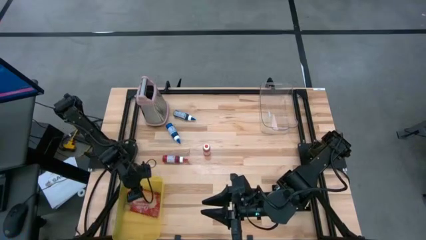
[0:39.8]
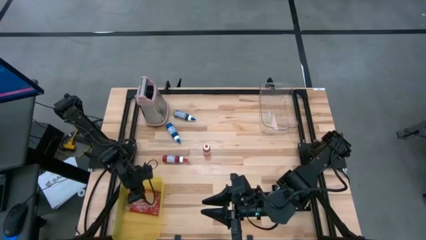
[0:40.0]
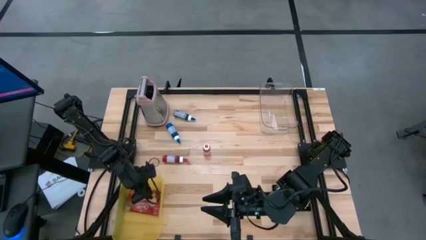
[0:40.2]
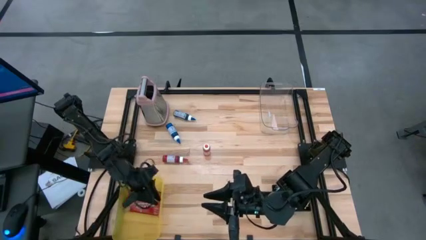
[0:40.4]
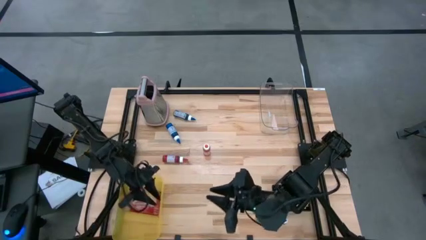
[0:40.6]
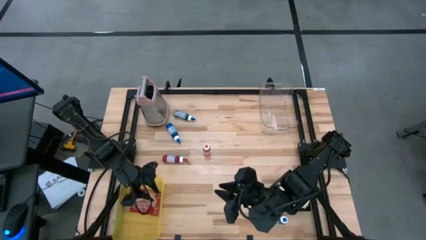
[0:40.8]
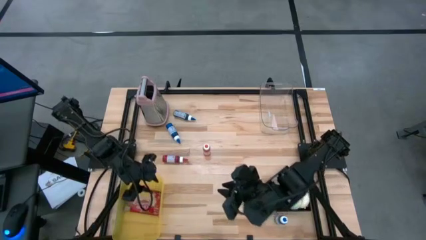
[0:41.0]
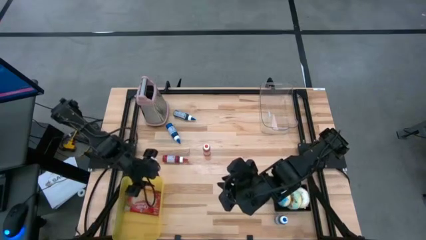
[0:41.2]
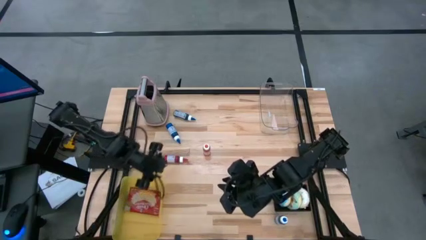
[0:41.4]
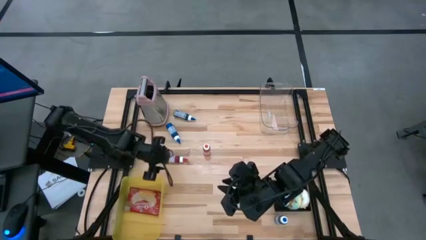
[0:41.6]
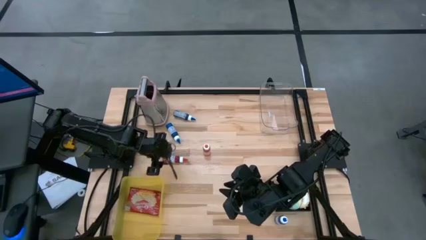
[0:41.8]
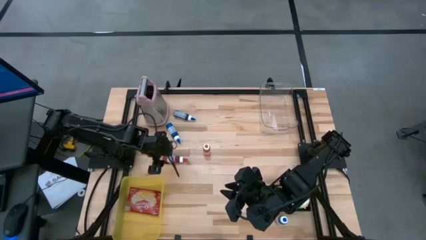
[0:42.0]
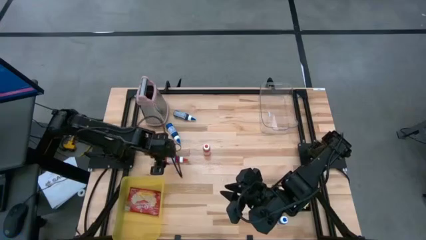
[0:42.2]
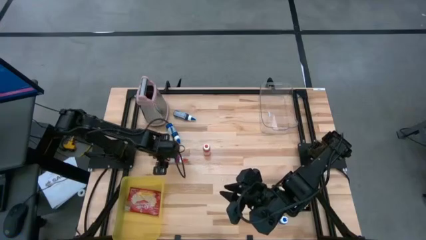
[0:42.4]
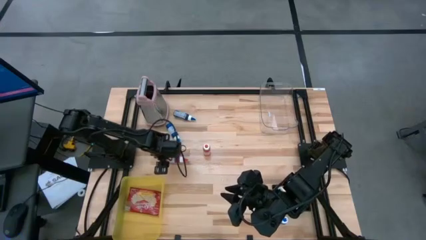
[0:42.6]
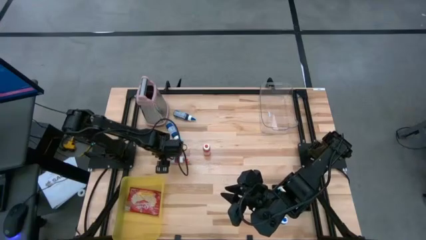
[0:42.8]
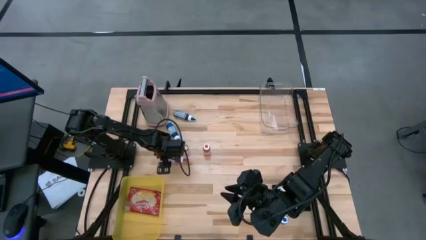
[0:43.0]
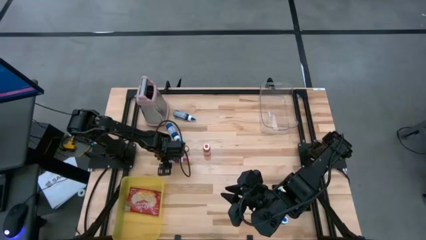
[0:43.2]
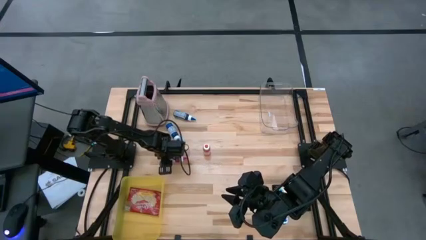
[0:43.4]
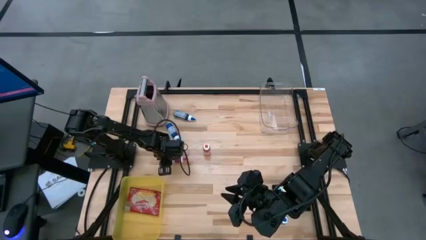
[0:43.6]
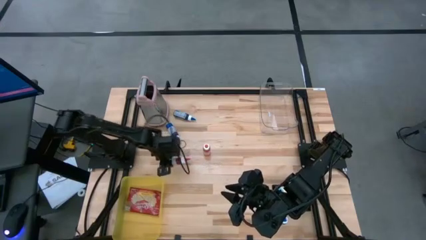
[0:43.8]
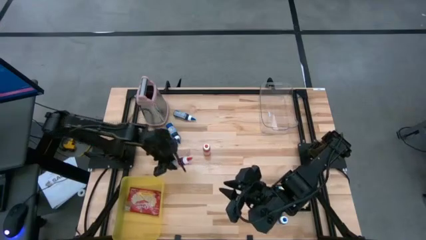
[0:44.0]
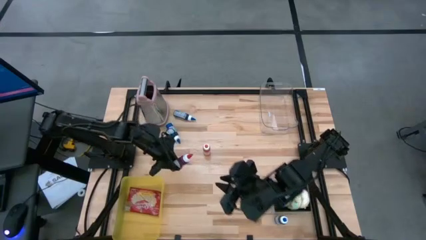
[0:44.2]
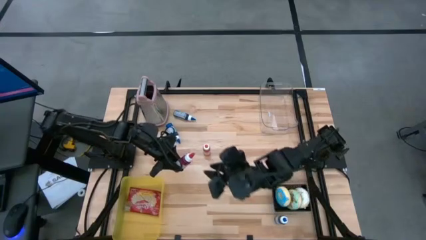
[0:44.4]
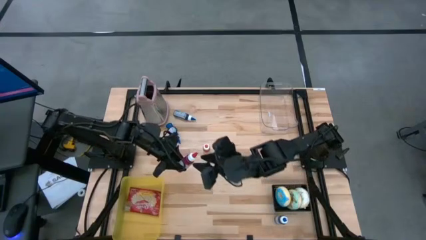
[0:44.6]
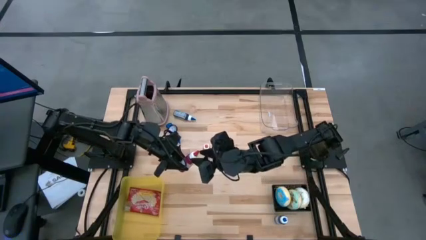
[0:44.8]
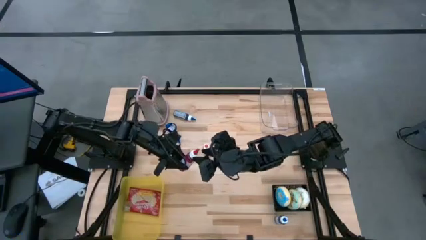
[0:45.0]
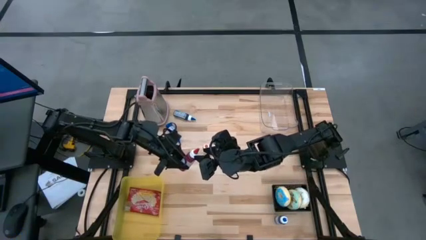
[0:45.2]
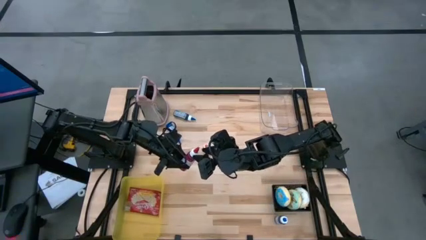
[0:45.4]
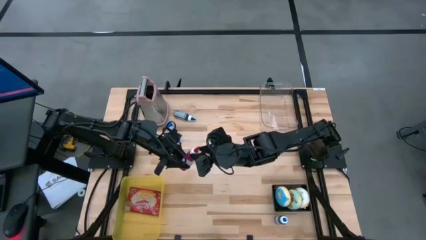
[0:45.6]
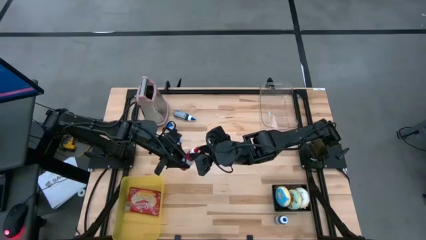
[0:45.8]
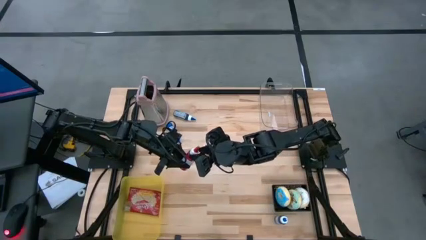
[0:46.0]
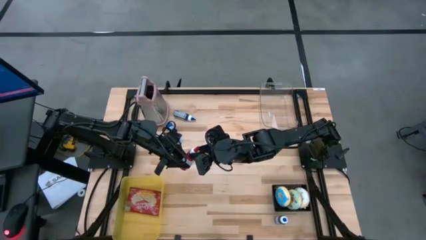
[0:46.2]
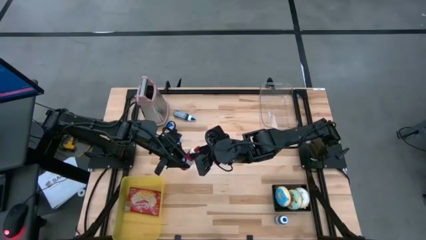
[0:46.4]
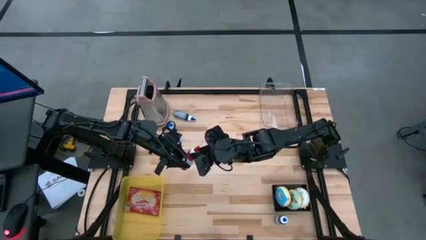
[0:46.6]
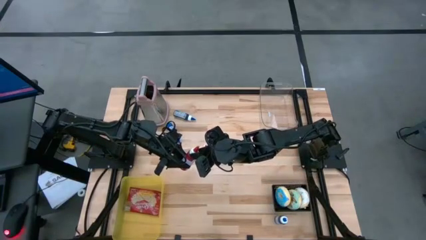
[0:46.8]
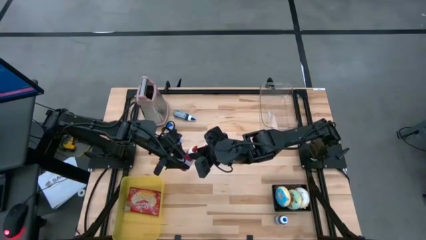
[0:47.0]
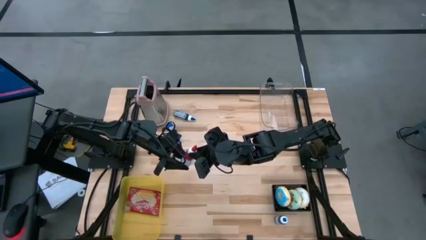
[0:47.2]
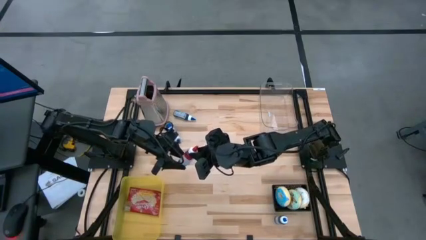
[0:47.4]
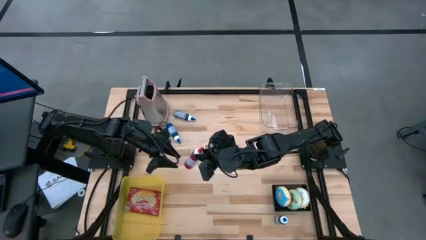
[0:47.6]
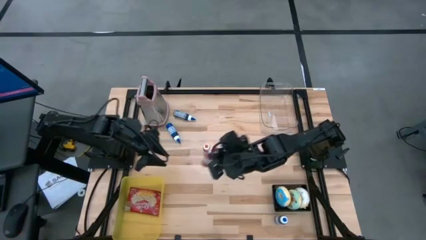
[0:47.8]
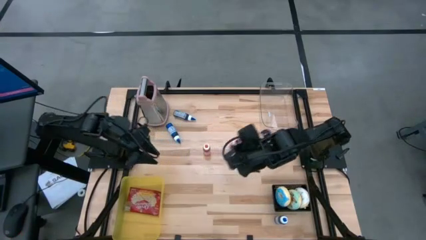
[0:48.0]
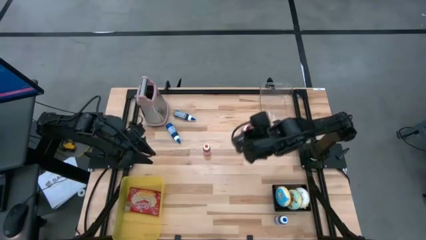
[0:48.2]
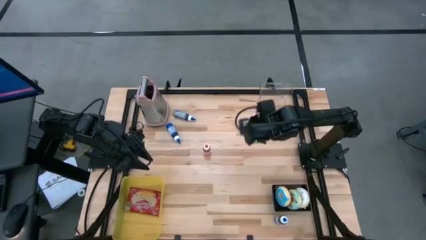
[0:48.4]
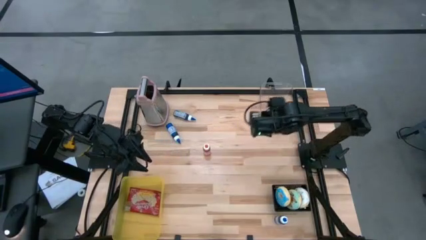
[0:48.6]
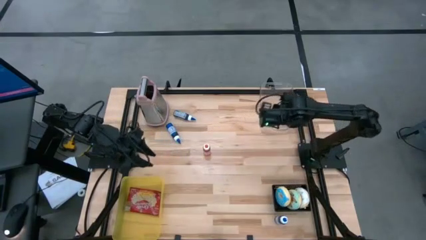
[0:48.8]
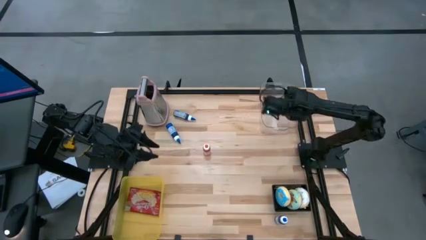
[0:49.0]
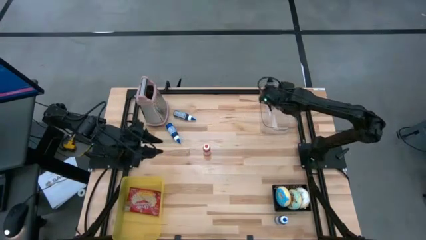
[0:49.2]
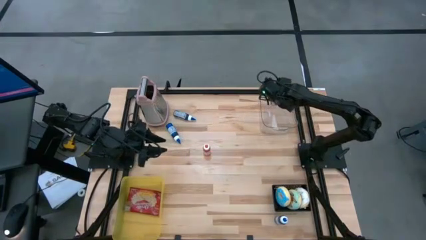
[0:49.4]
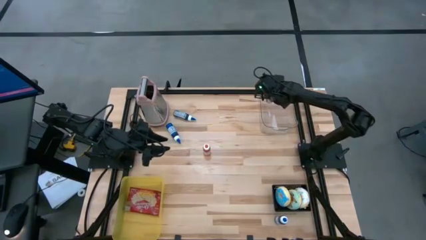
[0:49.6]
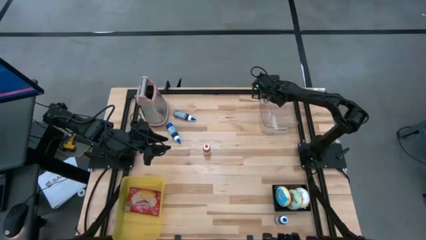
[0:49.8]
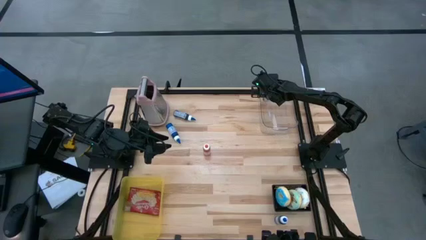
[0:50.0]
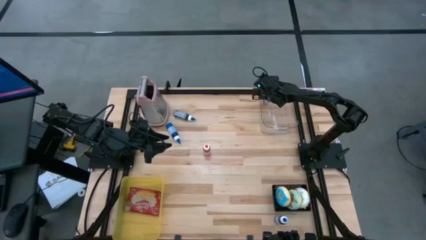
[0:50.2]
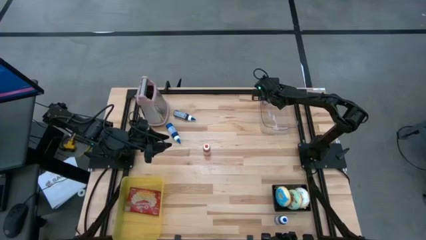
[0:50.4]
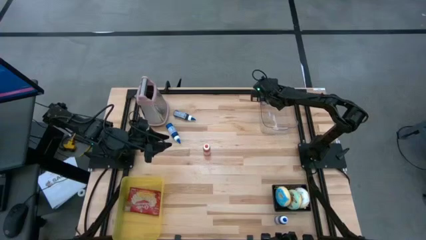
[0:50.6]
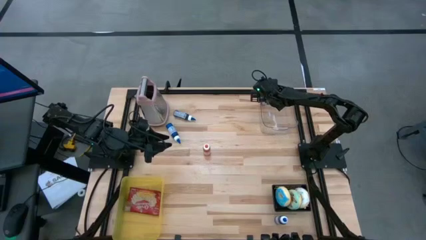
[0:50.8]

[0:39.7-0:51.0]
Put the red food coloring bottle into the transparent bin
